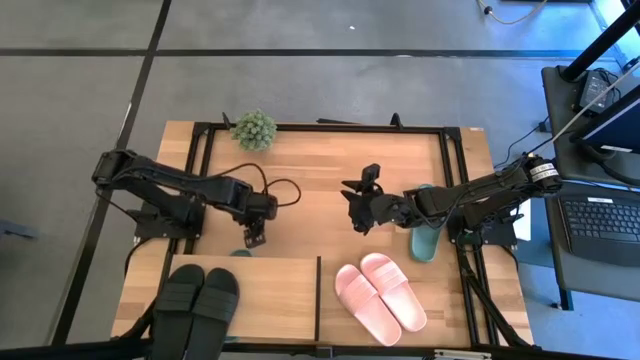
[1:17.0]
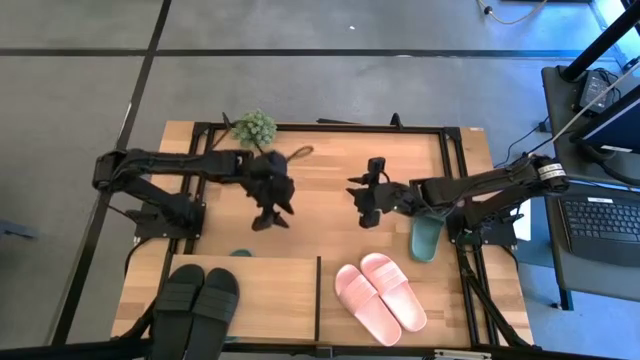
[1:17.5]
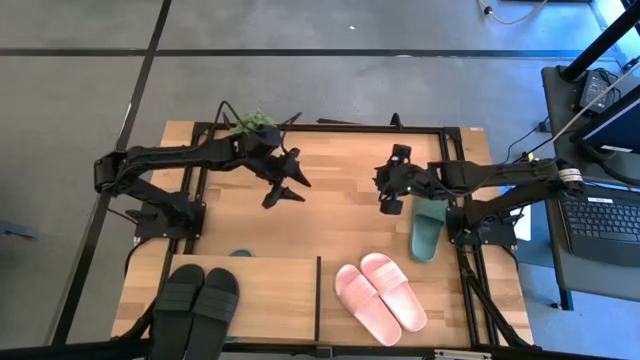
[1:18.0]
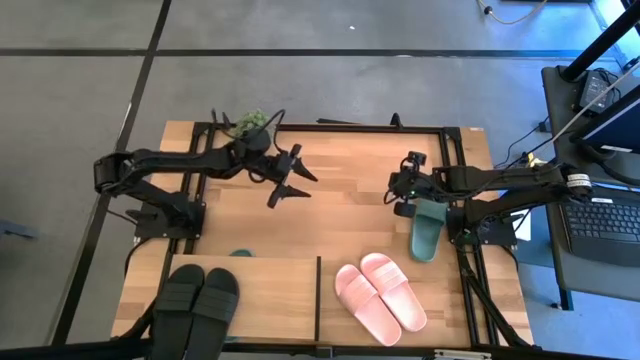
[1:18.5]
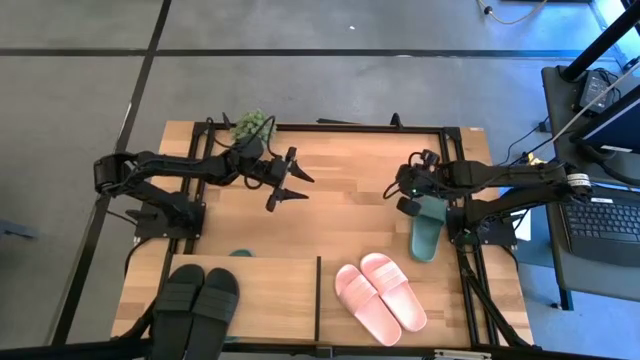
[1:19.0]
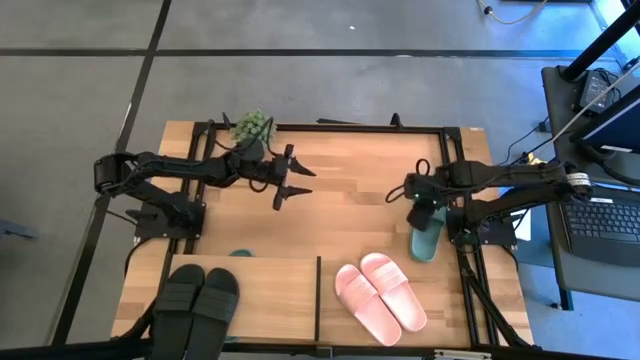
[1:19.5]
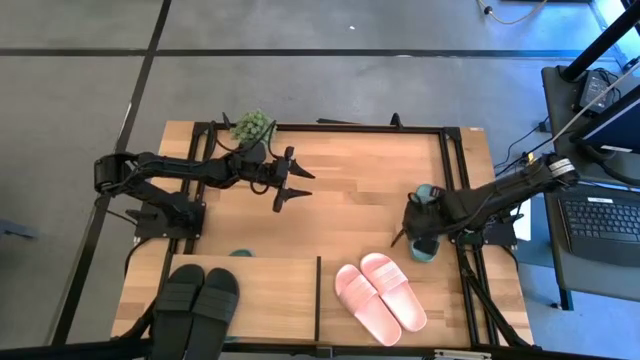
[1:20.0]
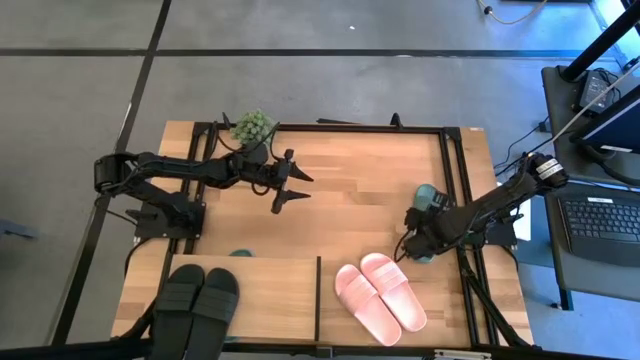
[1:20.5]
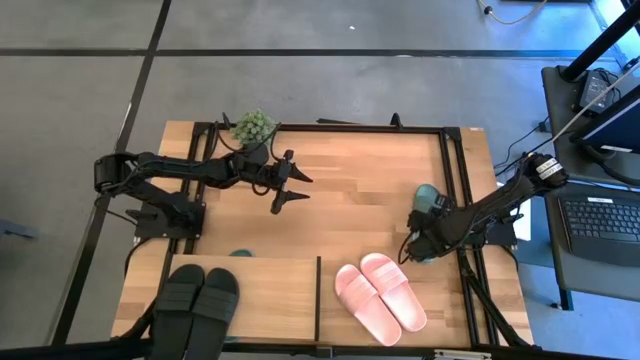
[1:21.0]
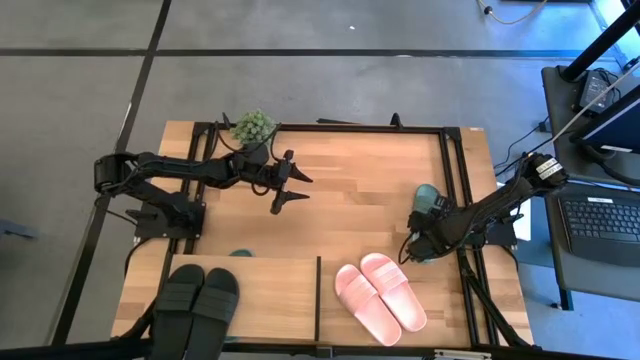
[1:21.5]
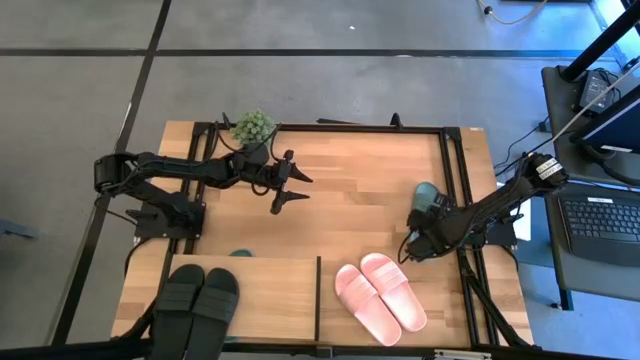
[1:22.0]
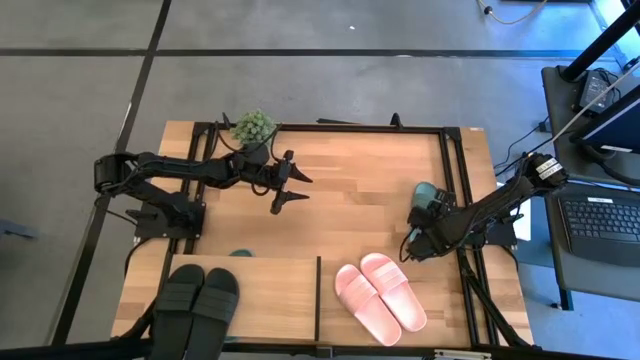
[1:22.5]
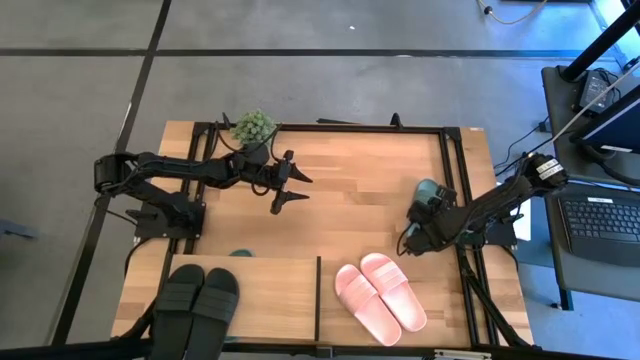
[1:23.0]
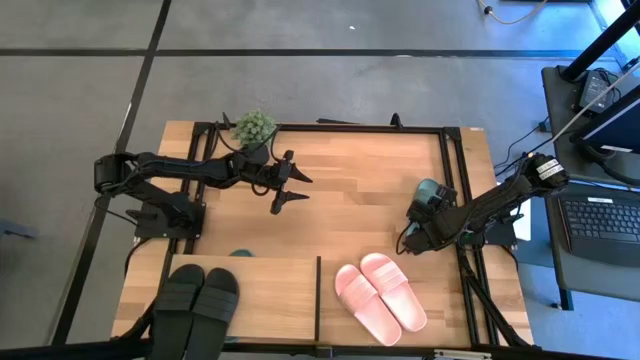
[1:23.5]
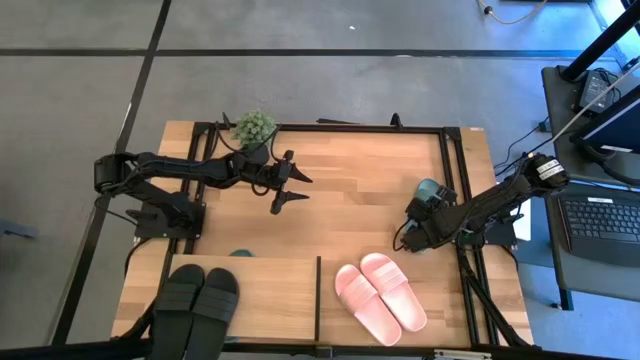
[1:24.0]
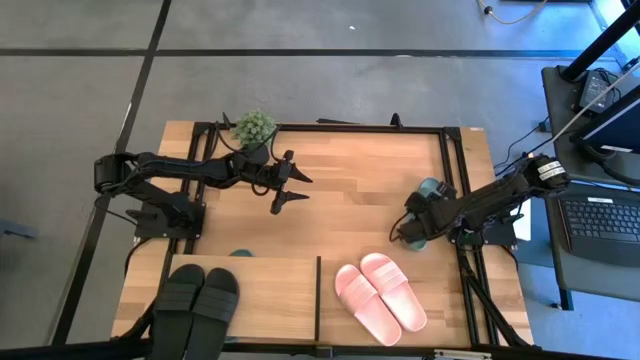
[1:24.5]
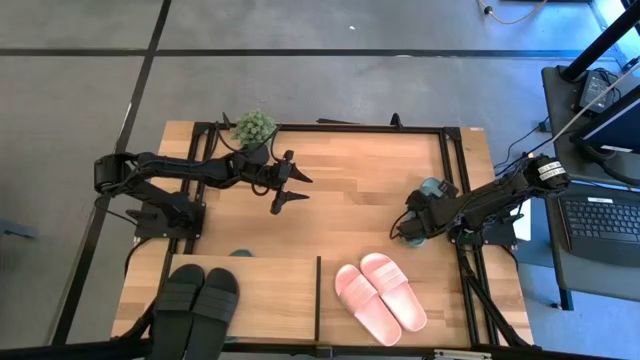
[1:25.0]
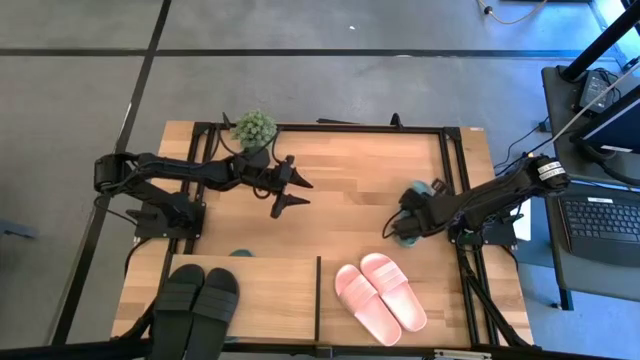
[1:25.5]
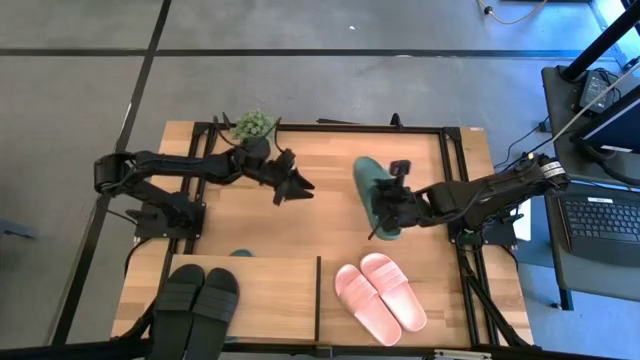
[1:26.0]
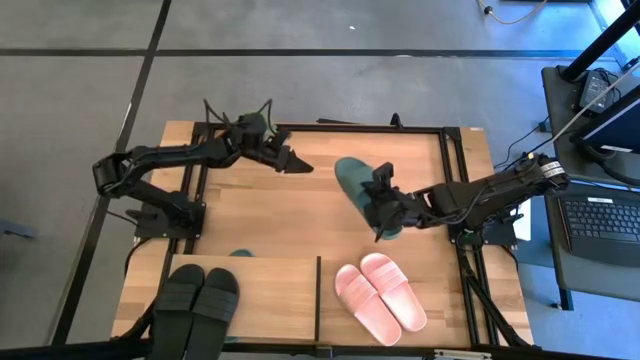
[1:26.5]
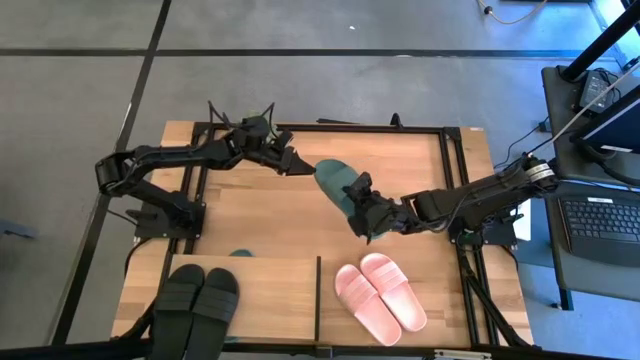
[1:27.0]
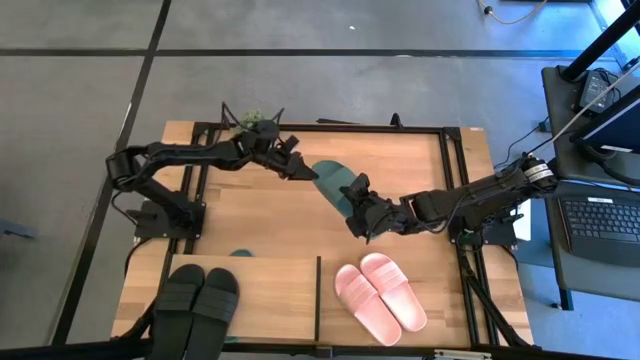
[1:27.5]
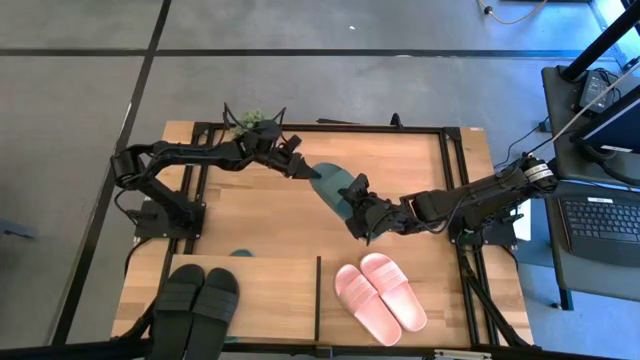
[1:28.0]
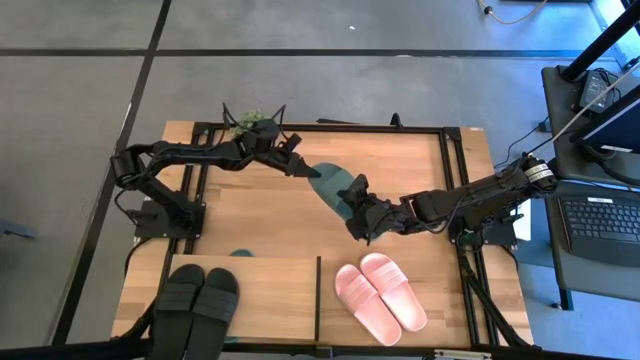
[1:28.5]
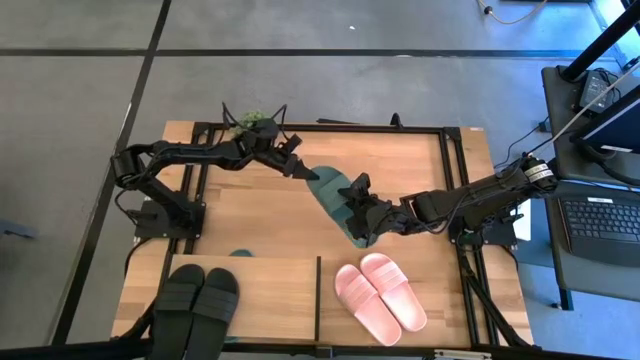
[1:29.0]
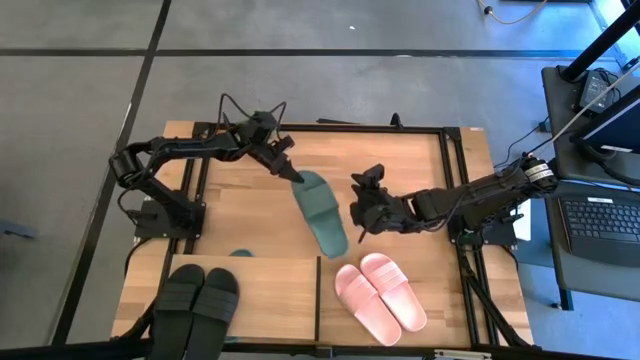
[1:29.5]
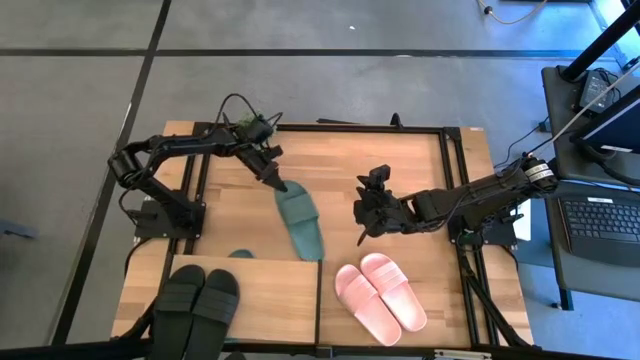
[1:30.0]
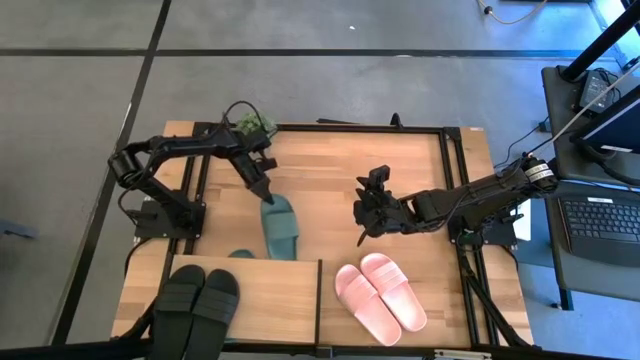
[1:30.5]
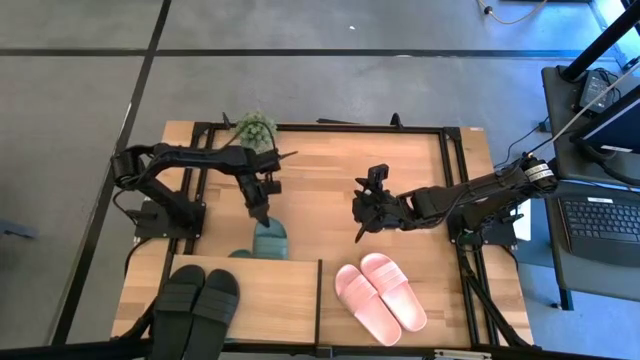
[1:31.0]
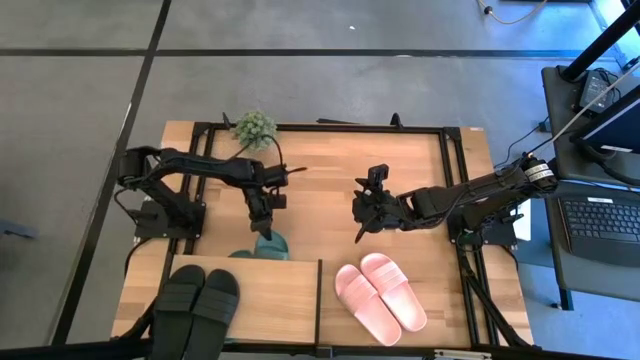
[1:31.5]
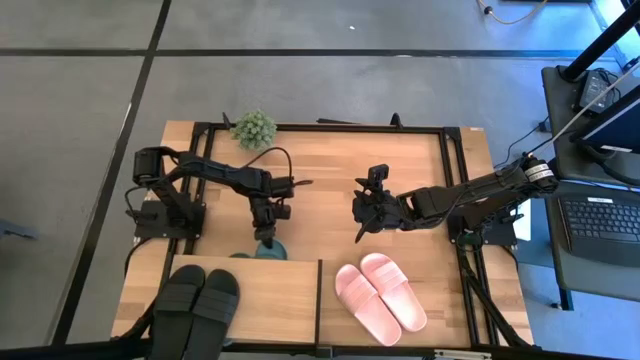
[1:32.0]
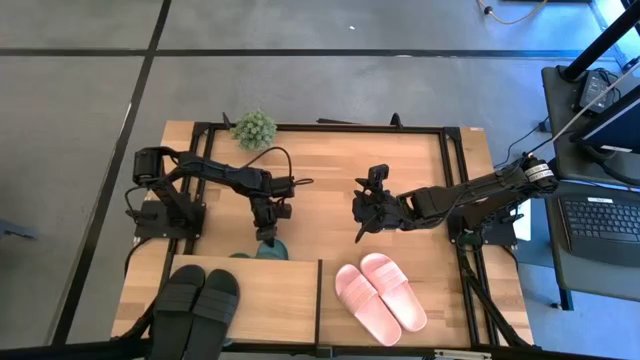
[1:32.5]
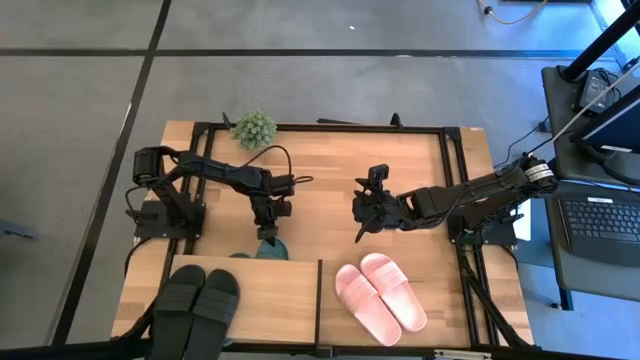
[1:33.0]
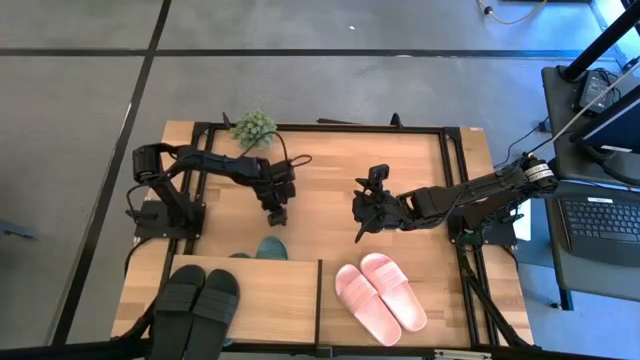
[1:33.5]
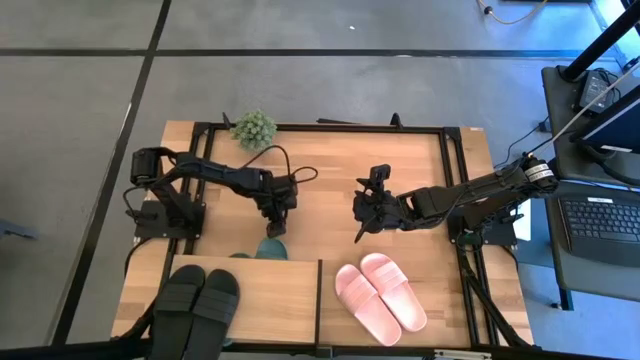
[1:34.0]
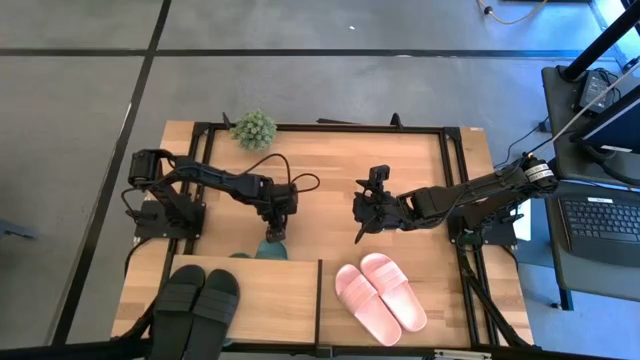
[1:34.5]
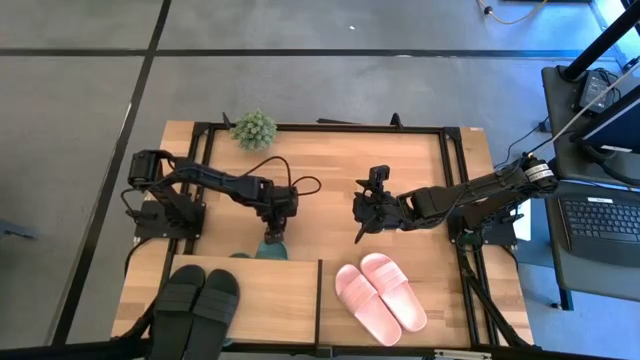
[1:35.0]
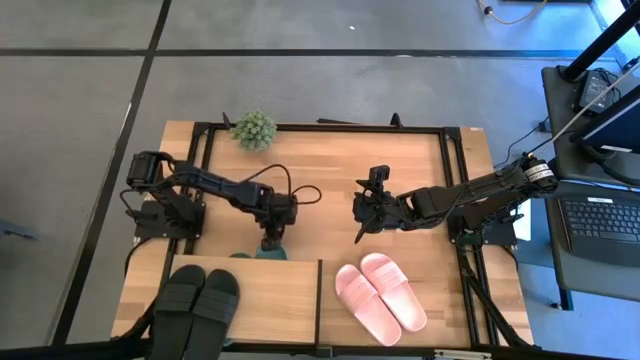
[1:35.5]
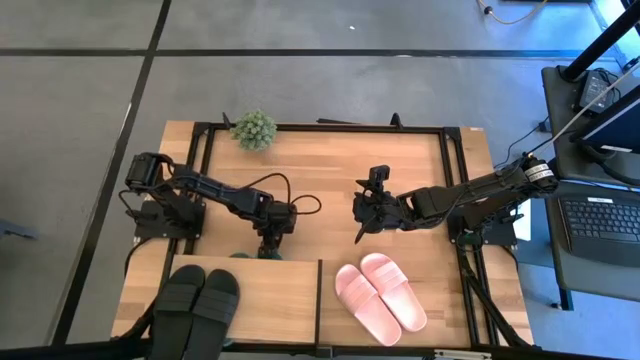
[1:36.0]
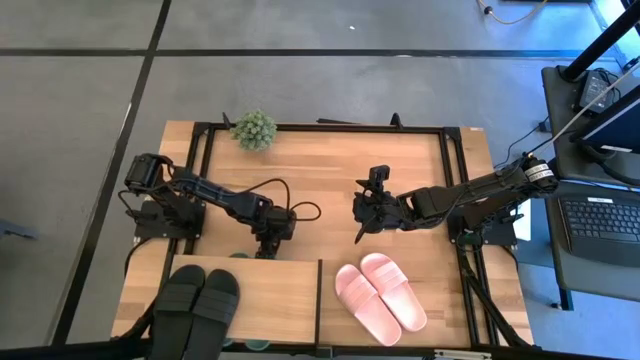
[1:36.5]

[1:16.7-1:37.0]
Task: Pick and place slides into the shelf
Put the green slipper under the shelf

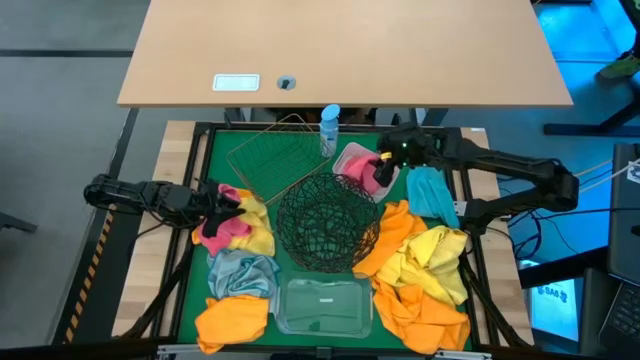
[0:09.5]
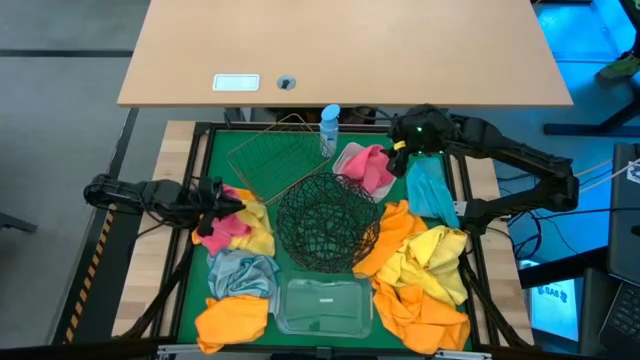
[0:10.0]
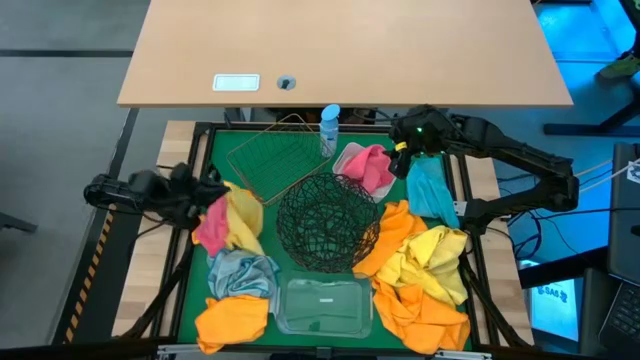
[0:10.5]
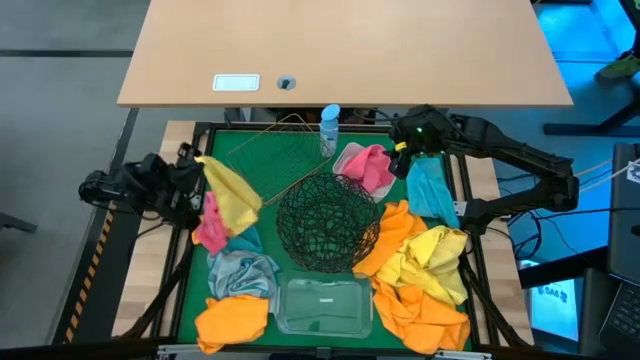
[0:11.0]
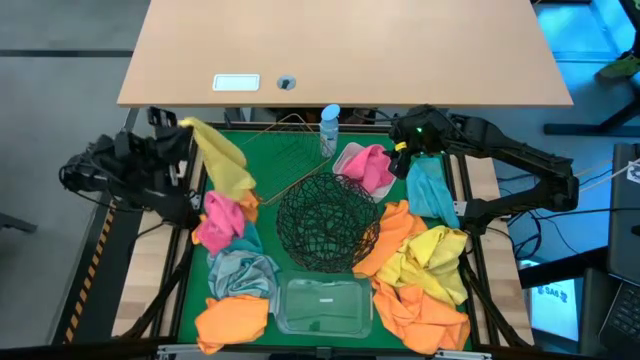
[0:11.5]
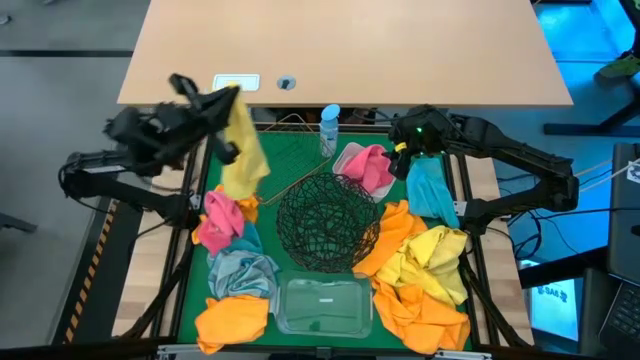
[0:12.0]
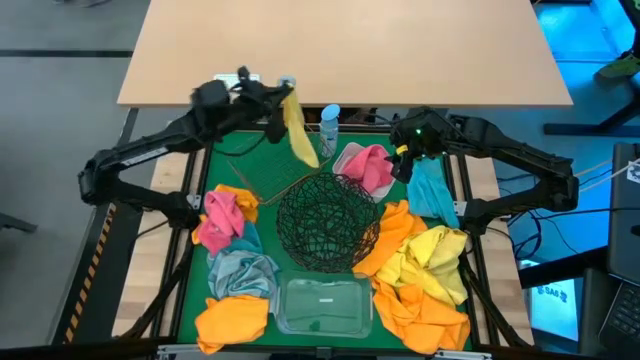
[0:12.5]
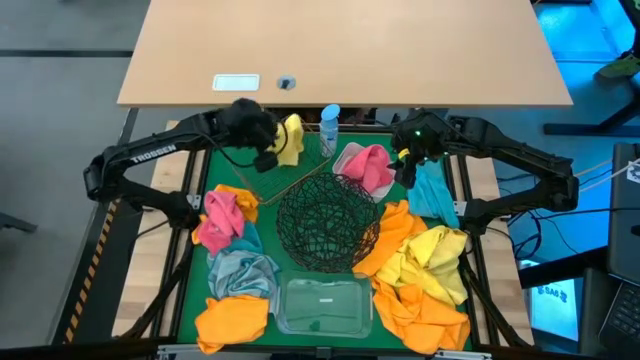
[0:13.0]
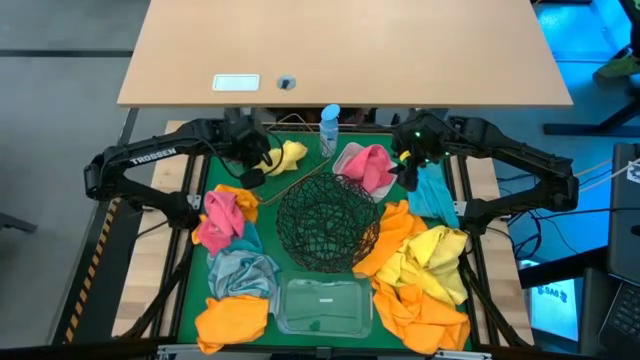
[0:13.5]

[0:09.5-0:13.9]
Task: Sort microfiber towel by color & place in baskets
Put the yellow microfiber towel into the brown wire basket
